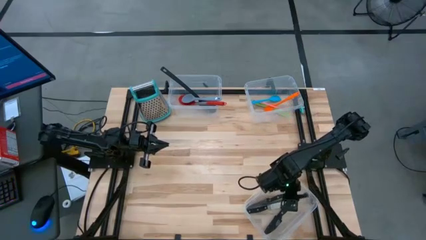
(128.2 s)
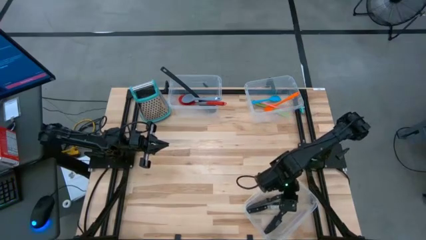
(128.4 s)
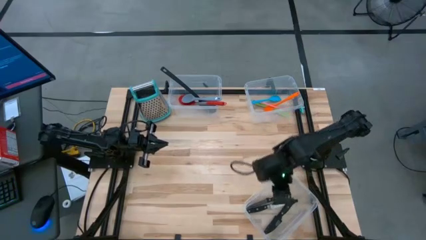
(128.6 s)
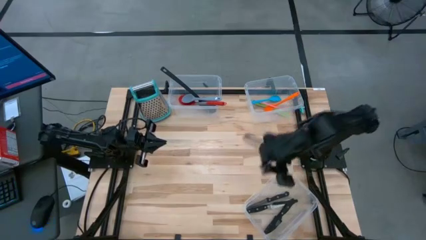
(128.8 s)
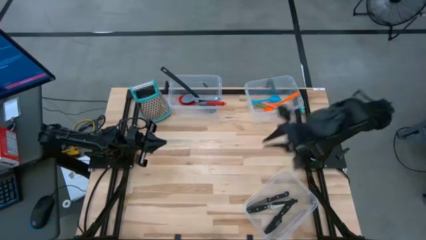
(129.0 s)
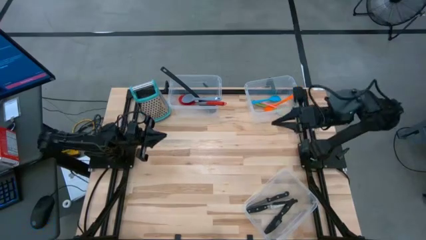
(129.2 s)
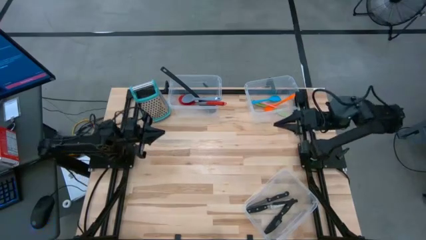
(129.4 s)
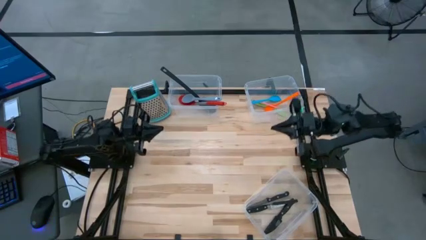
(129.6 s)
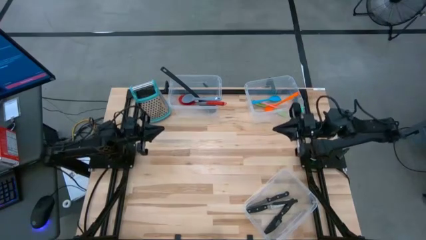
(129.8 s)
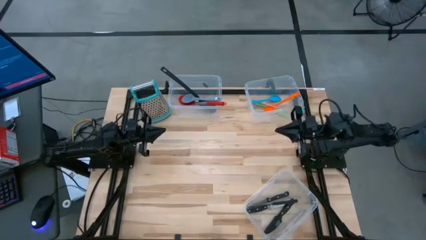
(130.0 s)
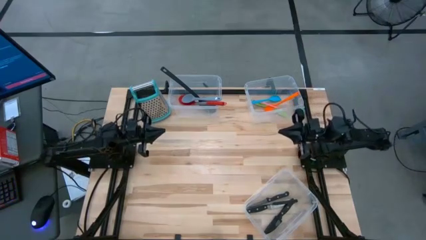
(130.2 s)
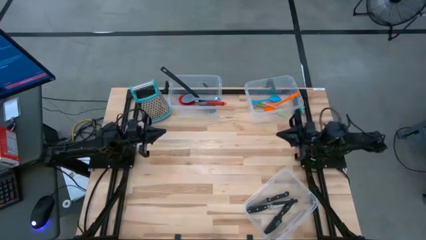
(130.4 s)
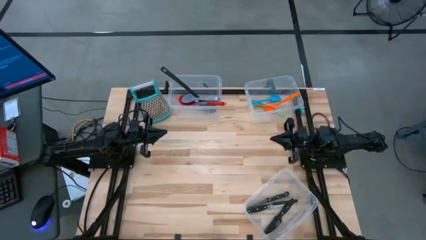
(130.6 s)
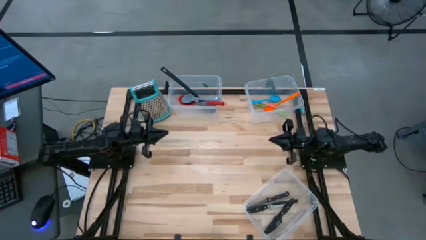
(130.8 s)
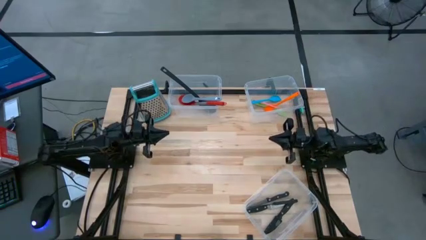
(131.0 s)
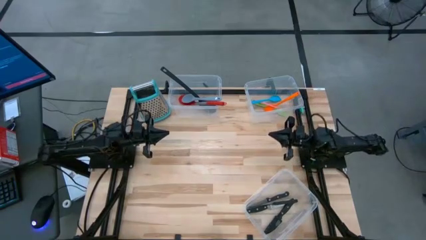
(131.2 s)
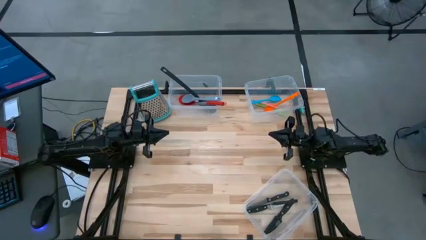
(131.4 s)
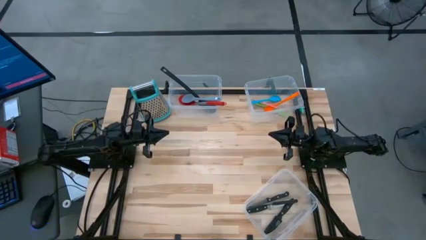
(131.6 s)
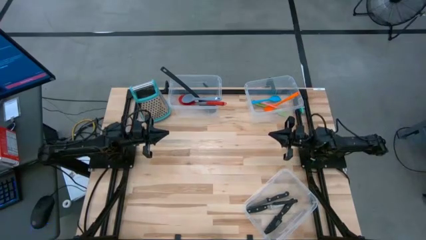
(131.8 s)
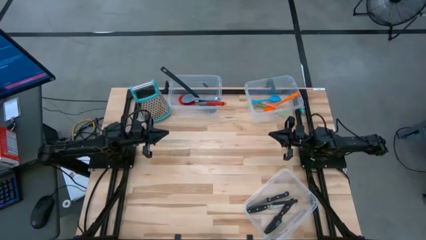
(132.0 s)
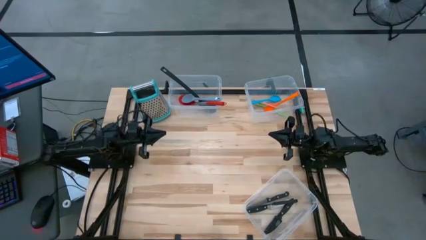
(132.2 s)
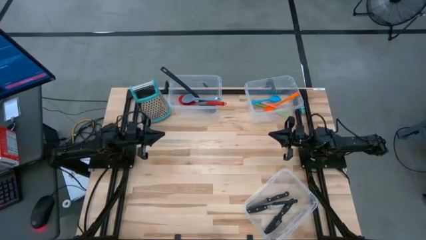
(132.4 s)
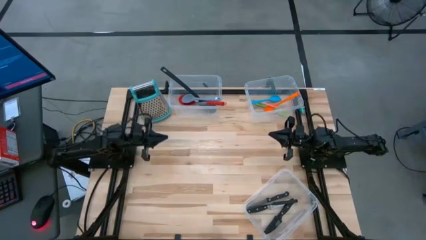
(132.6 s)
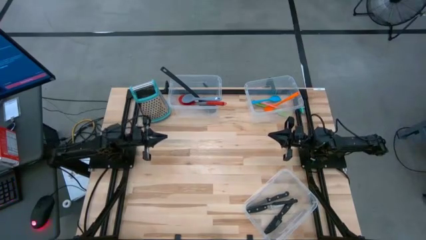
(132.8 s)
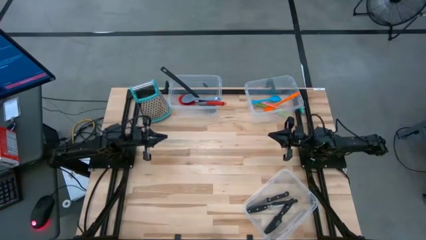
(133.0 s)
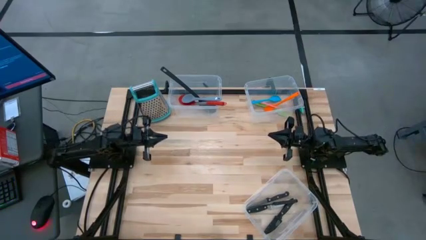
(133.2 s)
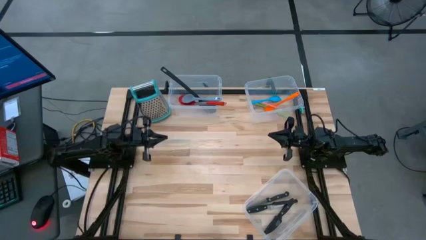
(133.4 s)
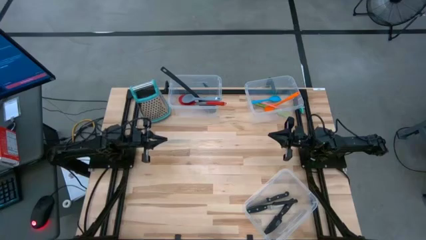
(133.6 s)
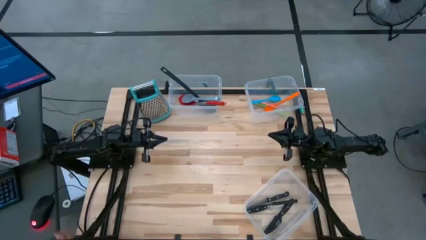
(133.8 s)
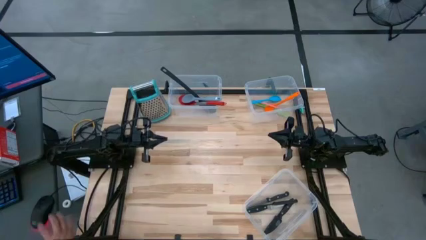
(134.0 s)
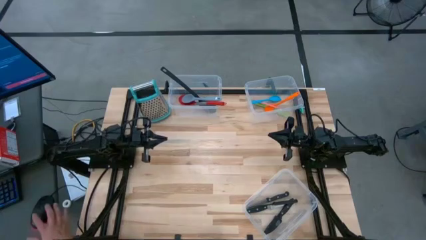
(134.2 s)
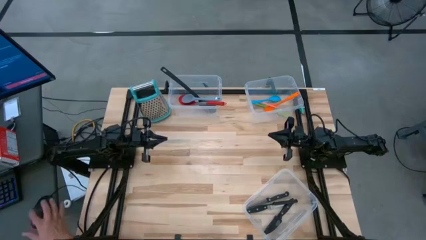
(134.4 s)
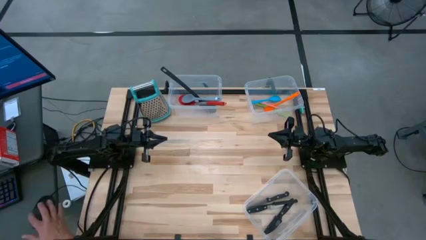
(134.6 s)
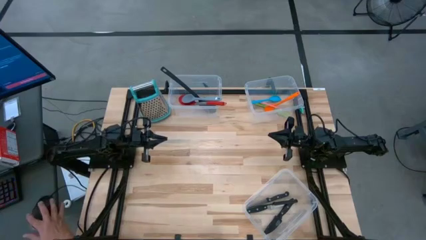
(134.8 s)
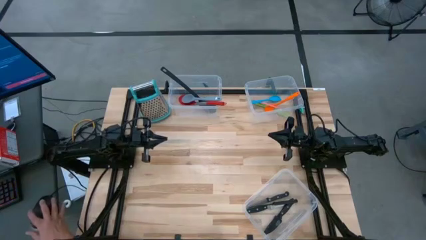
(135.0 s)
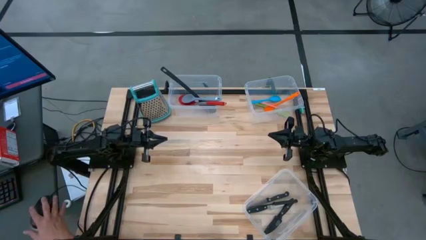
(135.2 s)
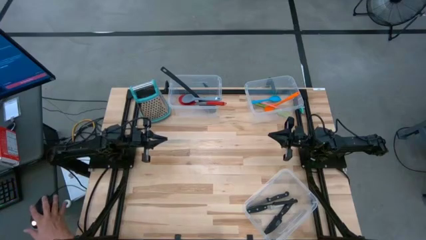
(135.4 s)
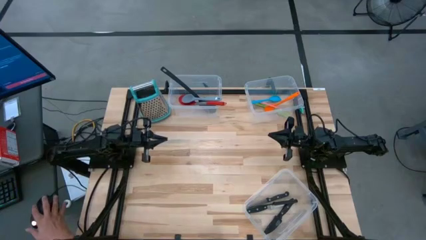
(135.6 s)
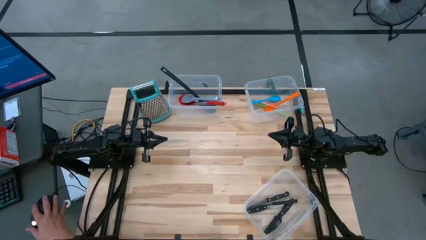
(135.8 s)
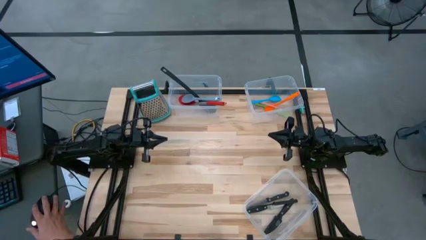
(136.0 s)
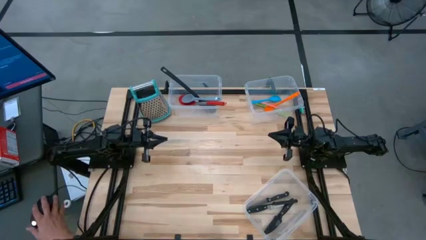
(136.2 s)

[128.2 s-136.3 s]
Task: Pick & Place Kitchen Items
Return to Home Position

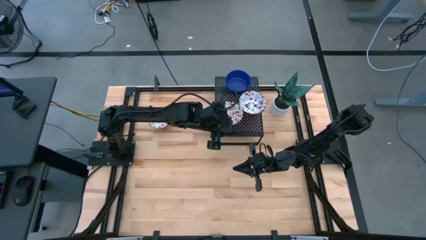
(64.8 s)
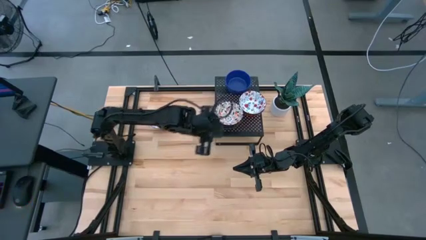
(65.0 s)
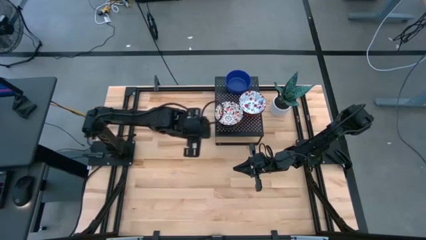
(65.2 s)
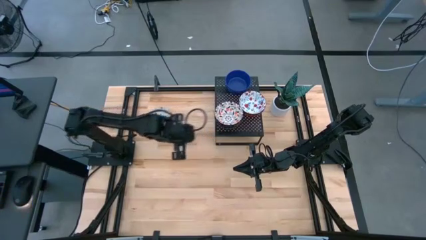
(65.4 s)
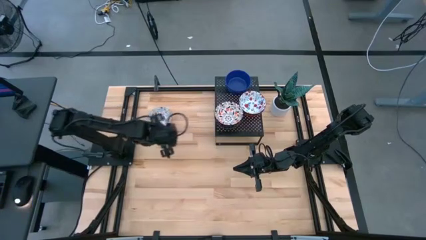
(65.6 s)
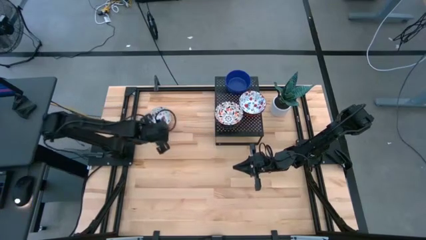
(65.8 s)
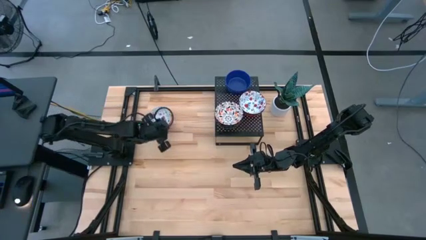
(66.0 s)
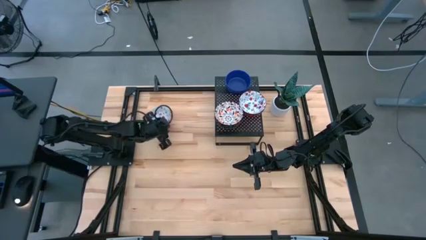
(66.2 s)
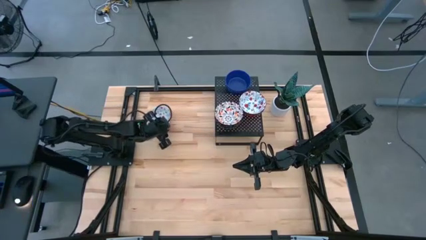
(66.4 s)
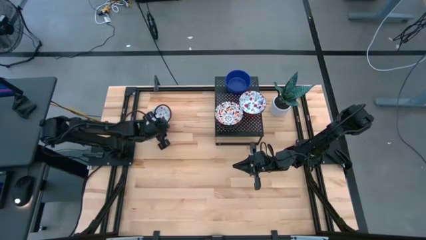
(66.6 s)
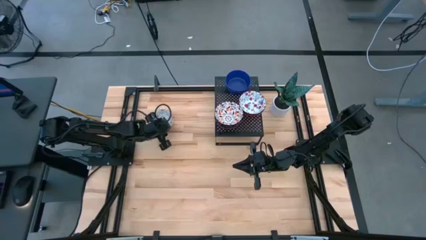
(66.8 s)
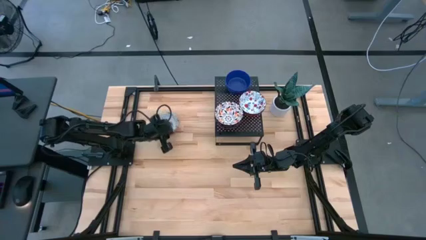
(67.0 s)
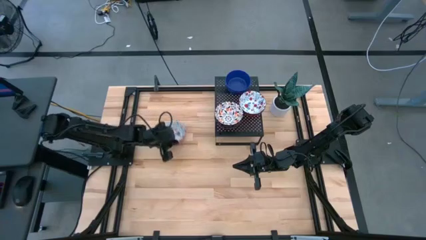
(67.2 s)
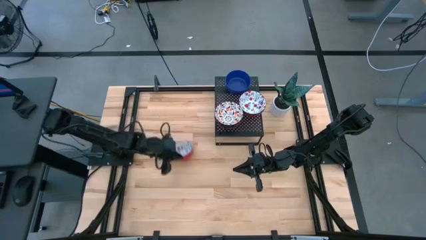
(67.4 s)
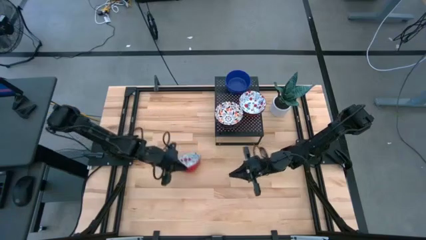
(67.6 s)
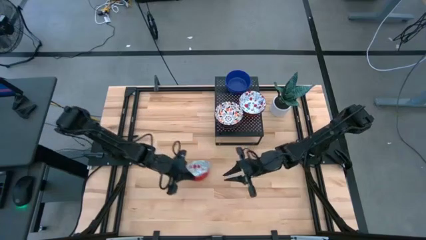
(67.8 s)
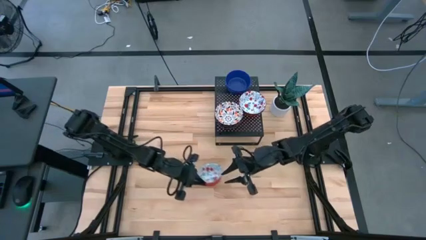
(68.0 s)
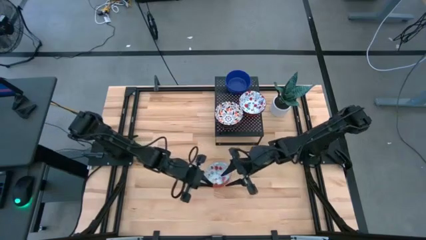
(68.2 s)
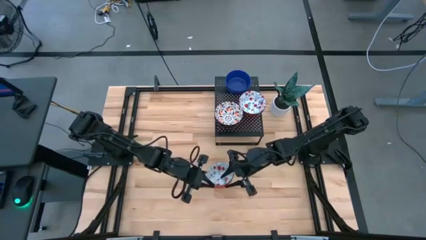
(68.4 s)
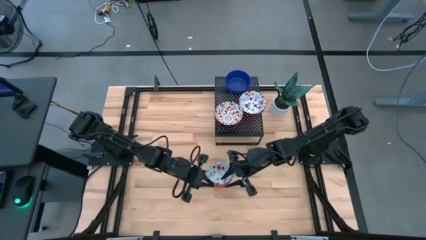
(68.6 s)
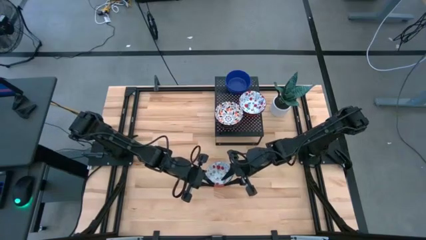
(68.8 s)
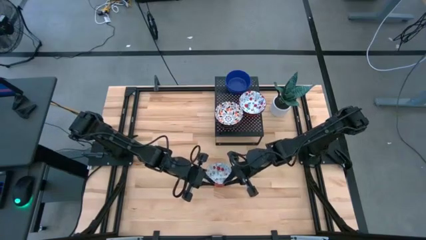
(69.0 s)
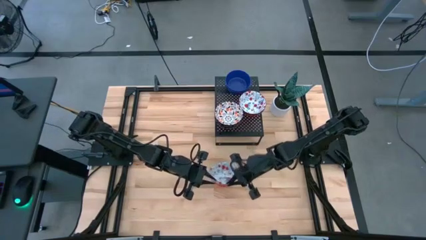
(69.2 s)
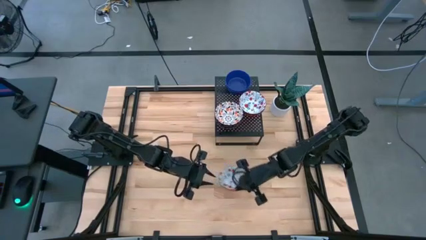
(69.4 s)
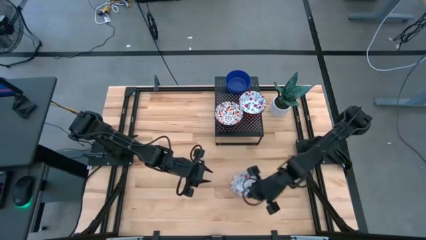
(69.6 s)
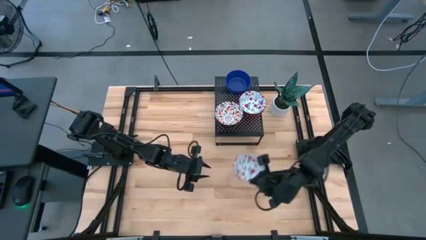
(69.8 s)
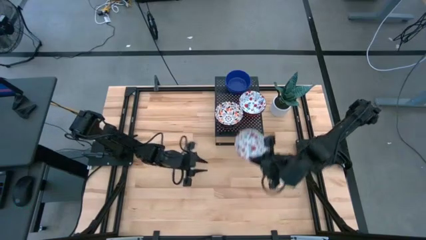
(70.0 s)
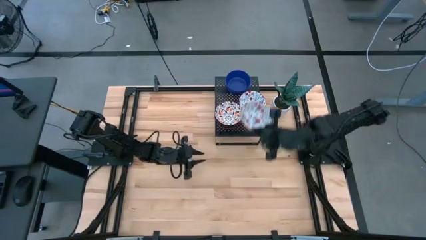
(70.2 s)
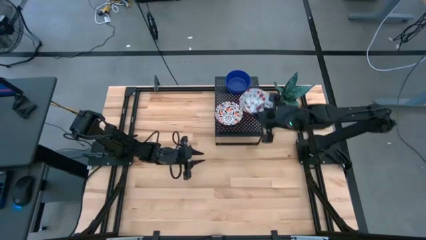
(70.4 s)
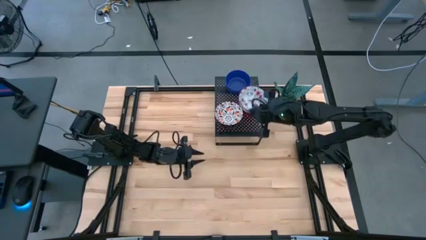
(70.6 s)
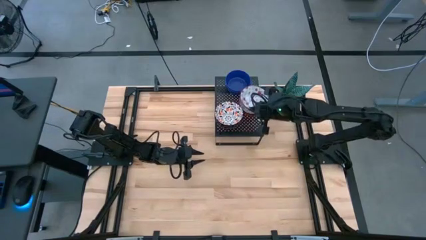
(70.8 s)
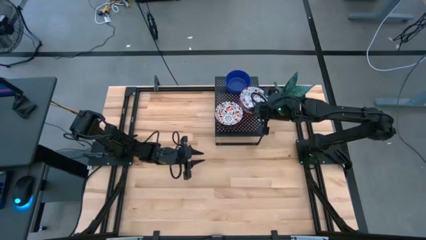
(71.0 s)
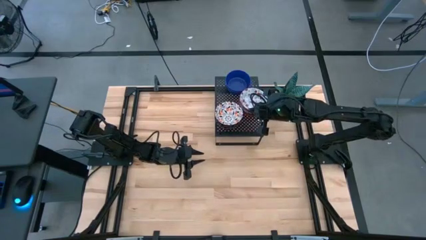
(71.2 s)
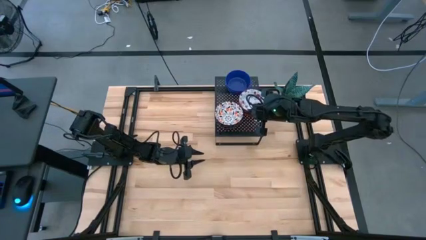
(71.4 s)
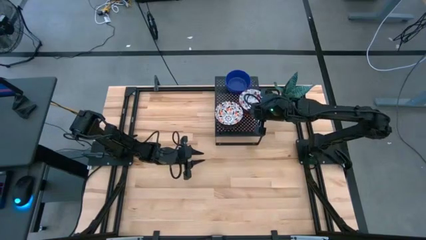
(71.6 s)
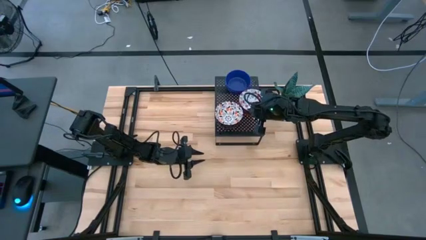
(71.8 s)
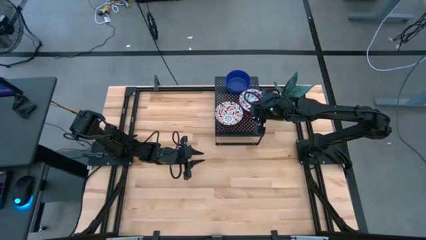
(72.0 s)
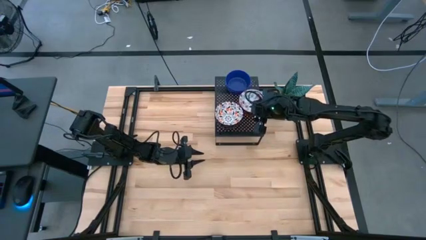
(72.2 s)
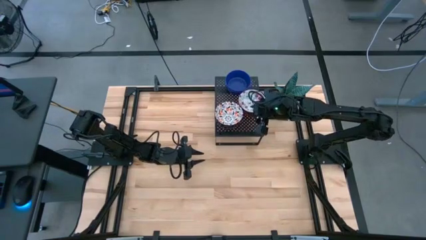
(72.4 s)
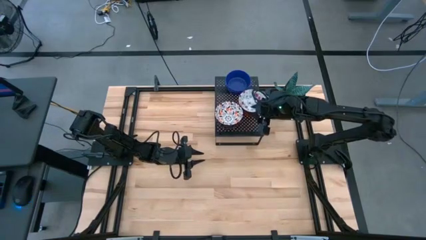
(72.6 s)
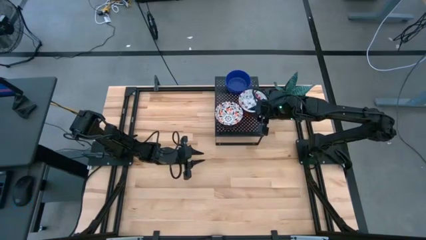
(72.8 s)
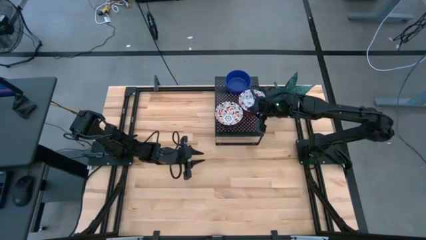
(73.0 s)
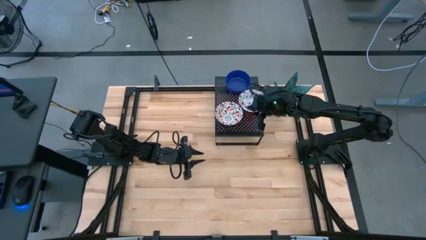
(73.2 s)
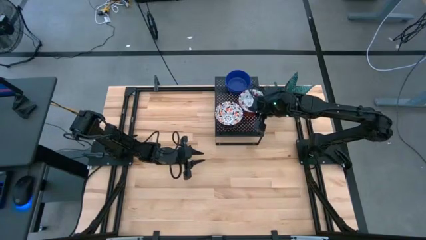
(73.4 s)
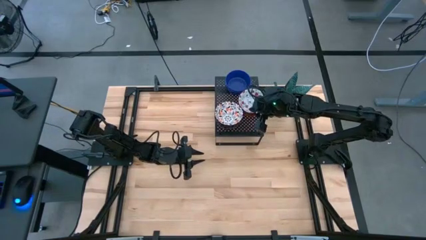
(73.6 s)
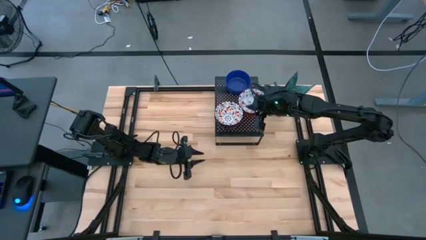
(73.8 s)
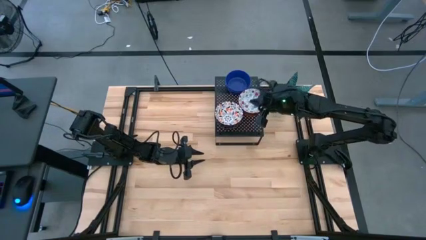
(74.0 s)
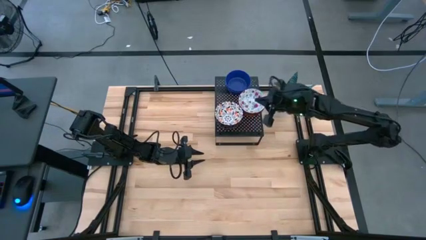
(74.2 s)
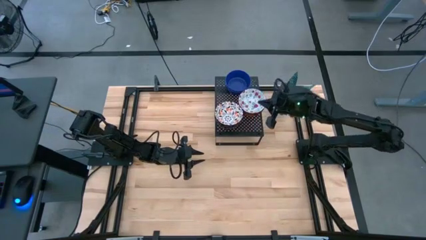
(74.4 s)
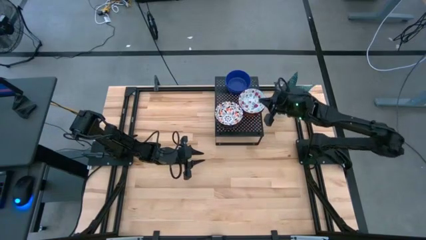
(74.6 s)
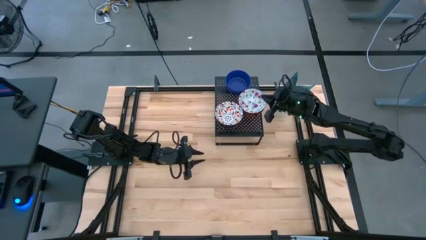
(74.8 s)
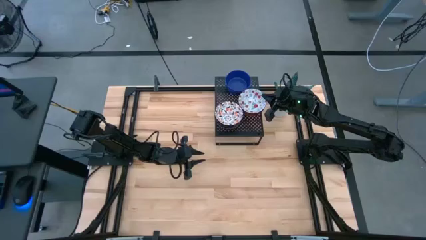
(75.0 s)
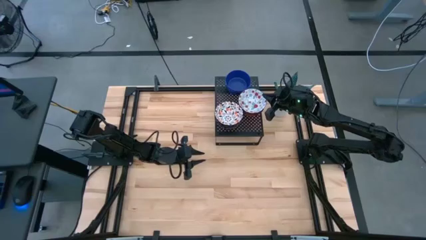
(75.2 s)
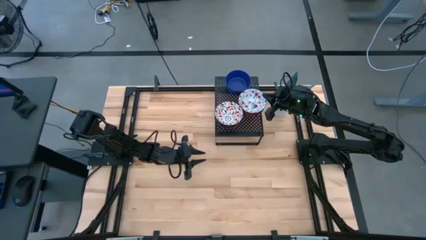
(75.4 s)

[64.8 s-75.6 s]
Task: Pick & Place Mini bowls
Stack the red and white bowl on the red and white bowl on the shelf
